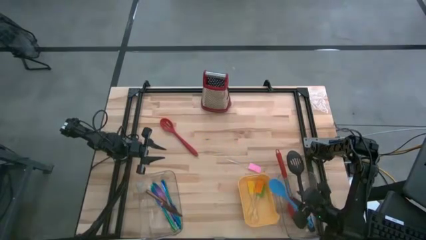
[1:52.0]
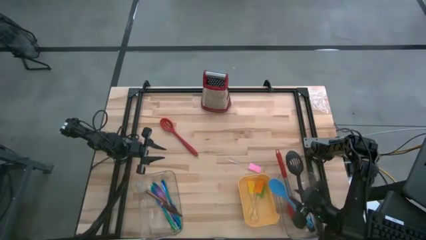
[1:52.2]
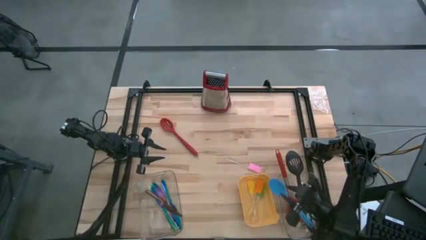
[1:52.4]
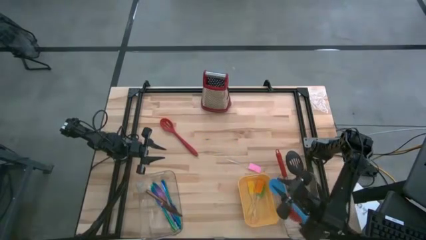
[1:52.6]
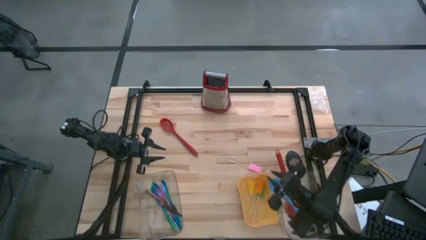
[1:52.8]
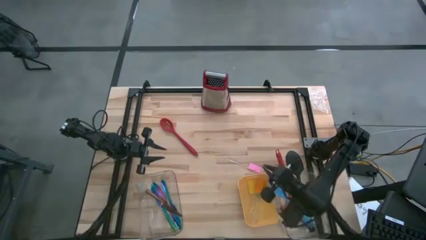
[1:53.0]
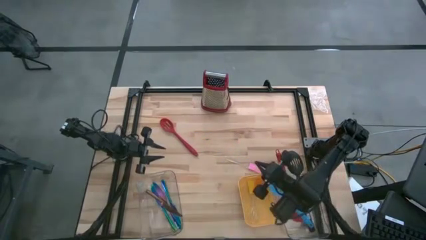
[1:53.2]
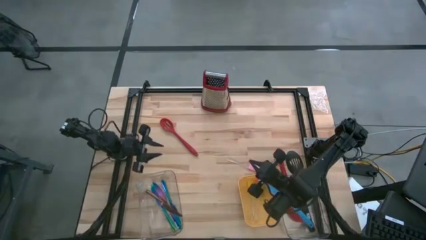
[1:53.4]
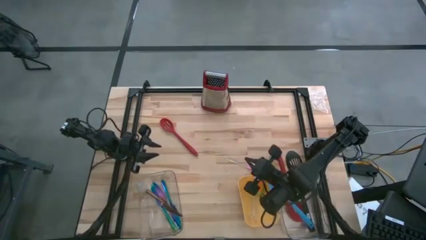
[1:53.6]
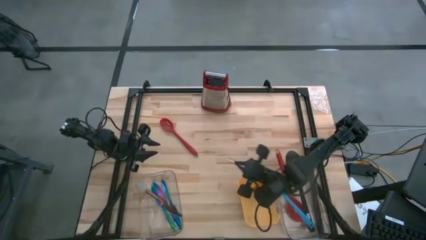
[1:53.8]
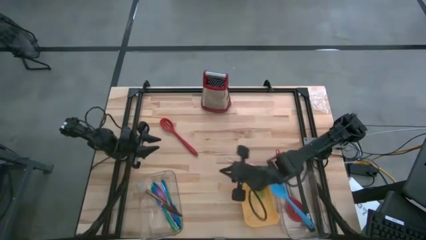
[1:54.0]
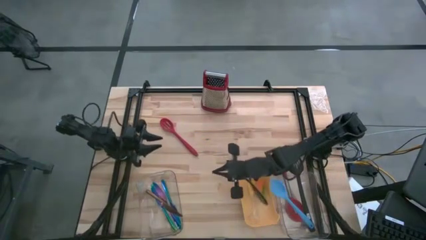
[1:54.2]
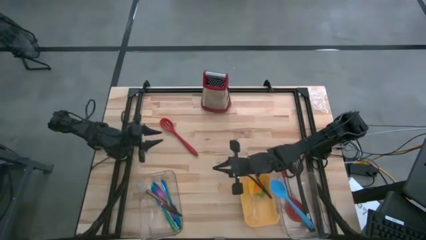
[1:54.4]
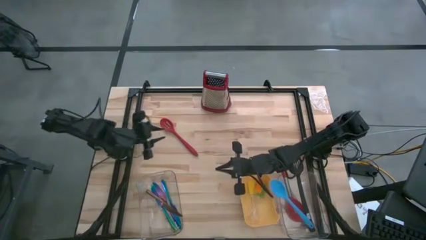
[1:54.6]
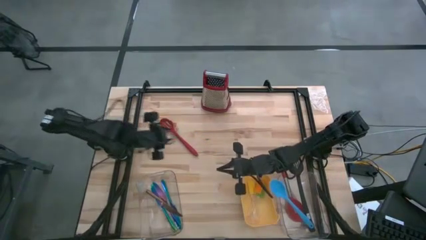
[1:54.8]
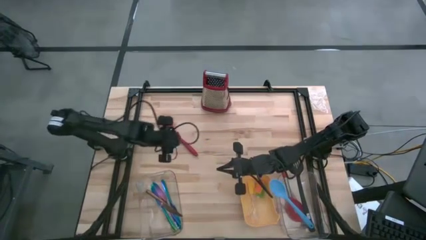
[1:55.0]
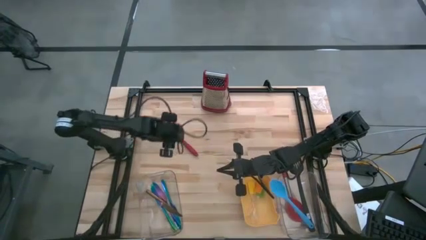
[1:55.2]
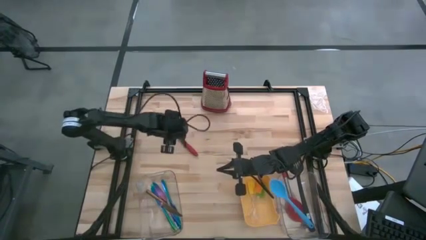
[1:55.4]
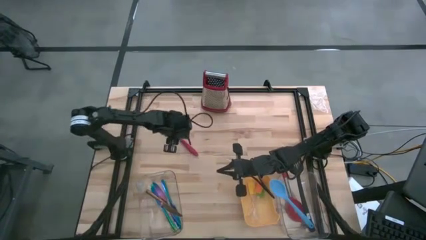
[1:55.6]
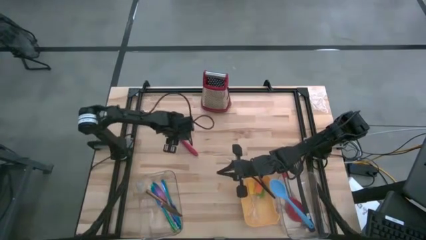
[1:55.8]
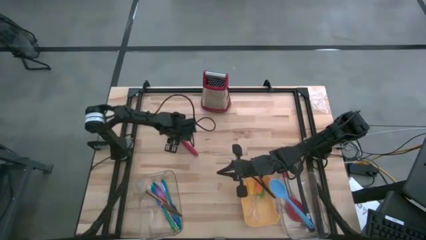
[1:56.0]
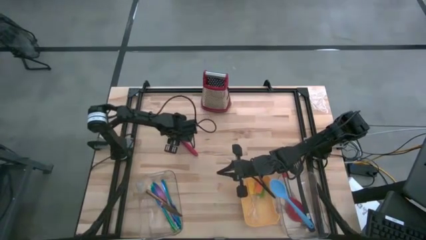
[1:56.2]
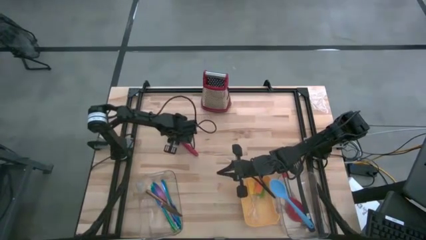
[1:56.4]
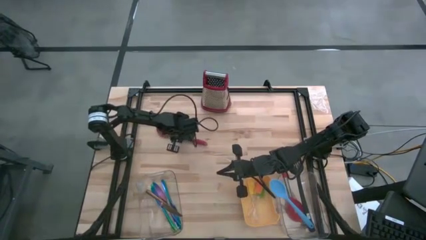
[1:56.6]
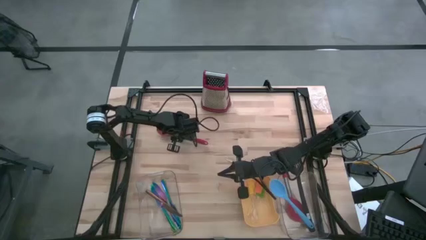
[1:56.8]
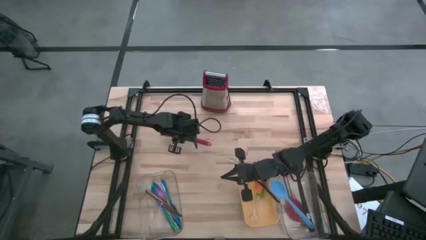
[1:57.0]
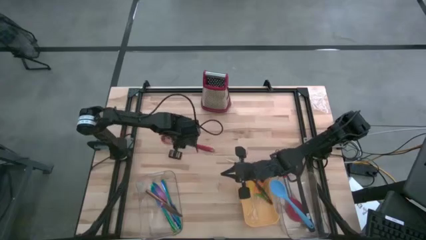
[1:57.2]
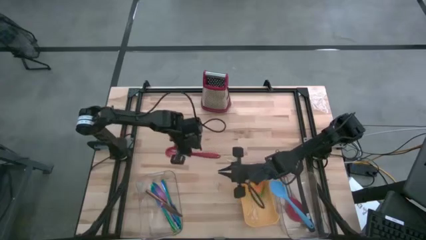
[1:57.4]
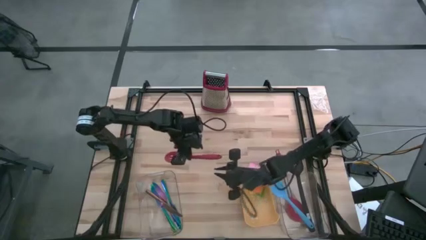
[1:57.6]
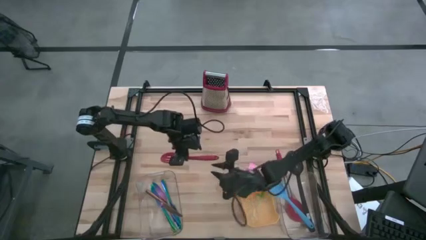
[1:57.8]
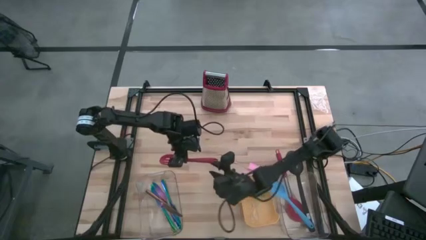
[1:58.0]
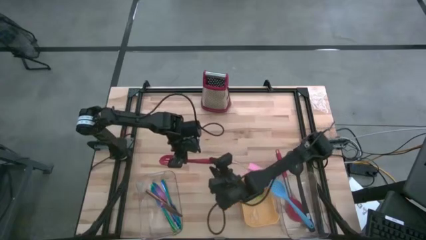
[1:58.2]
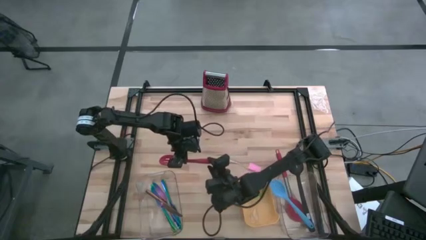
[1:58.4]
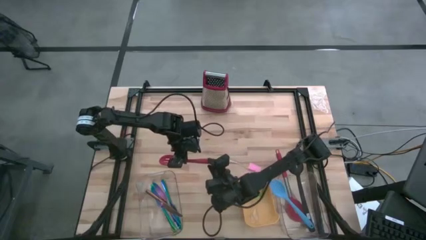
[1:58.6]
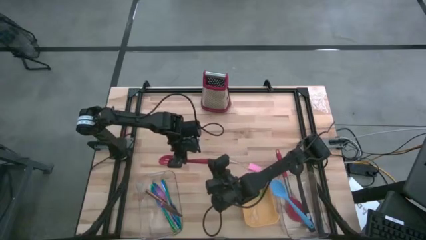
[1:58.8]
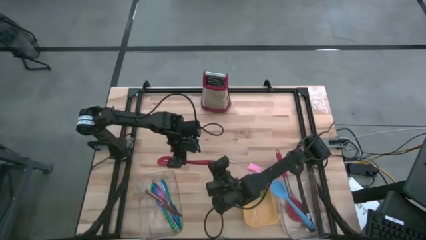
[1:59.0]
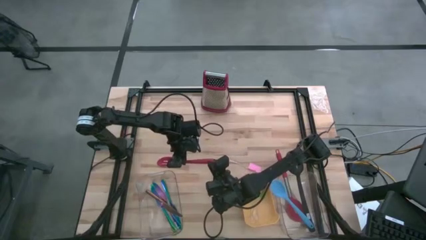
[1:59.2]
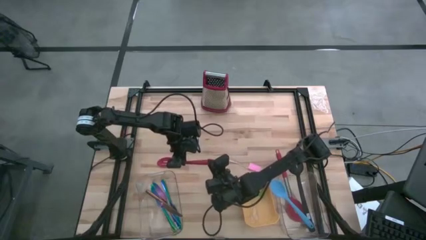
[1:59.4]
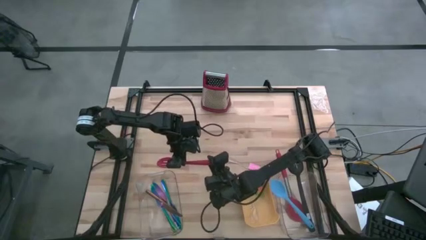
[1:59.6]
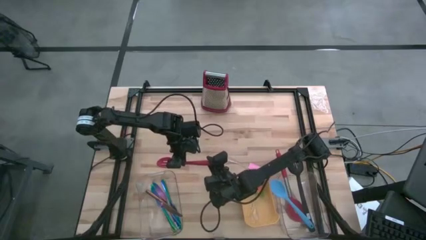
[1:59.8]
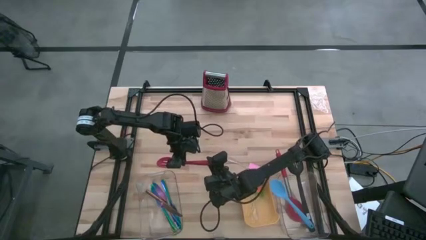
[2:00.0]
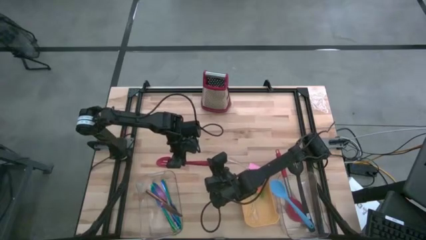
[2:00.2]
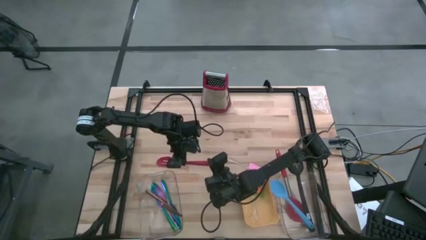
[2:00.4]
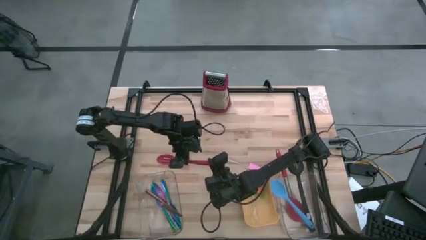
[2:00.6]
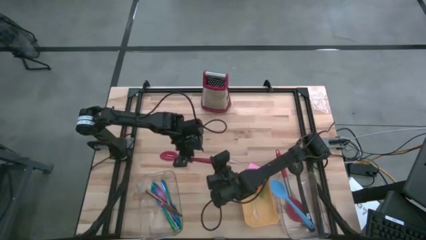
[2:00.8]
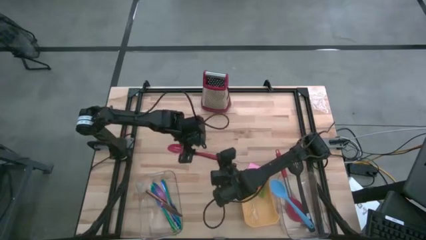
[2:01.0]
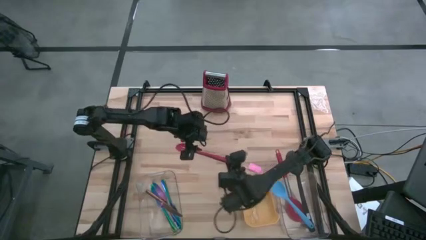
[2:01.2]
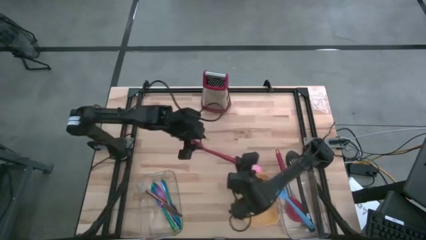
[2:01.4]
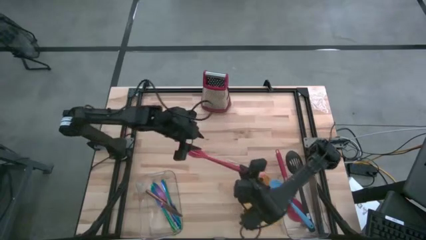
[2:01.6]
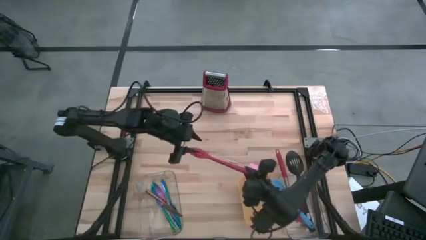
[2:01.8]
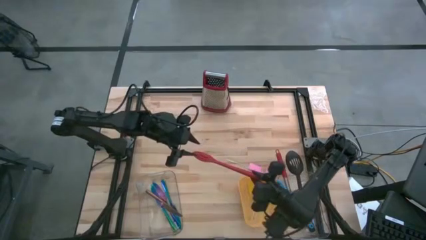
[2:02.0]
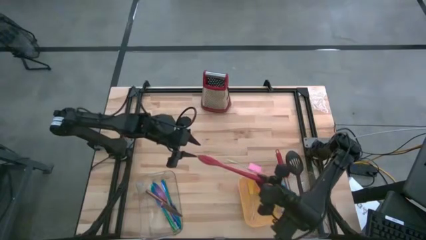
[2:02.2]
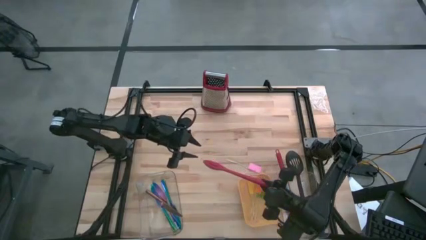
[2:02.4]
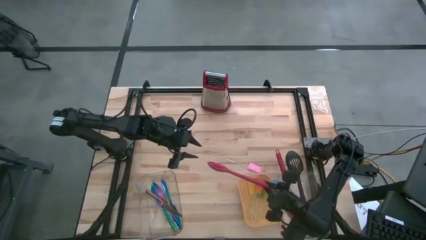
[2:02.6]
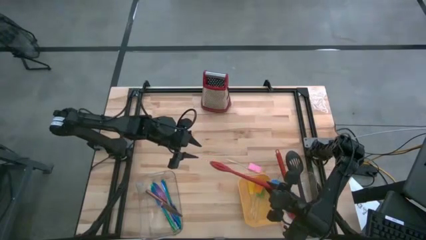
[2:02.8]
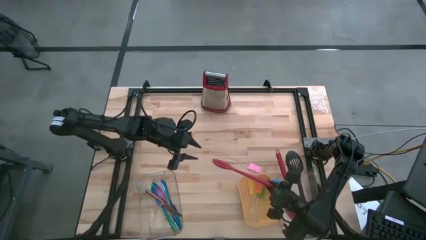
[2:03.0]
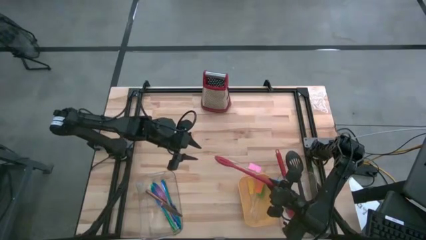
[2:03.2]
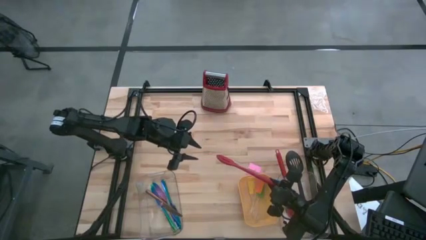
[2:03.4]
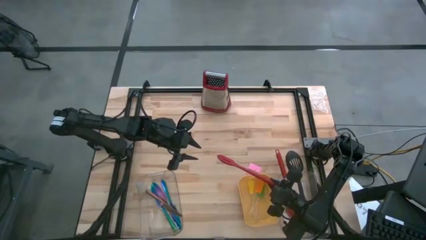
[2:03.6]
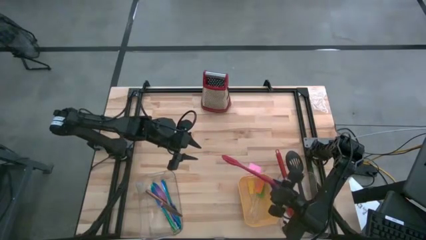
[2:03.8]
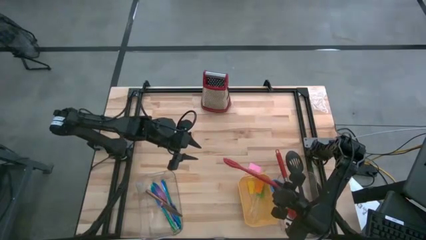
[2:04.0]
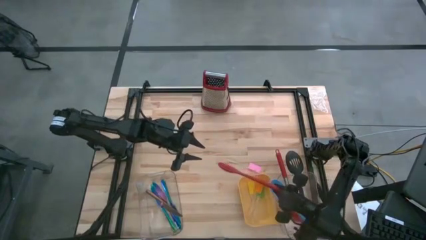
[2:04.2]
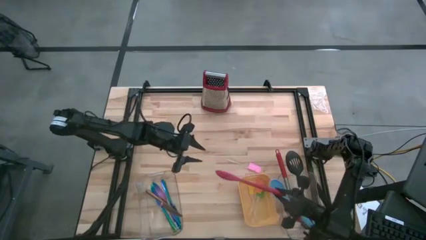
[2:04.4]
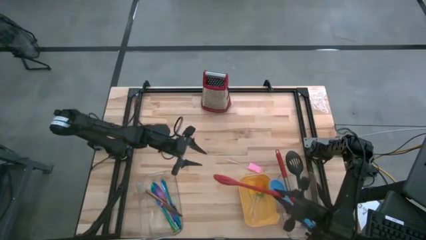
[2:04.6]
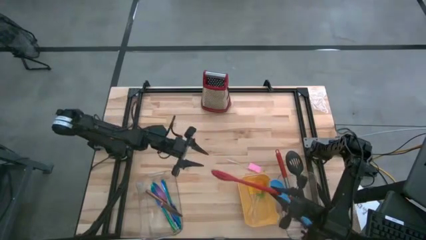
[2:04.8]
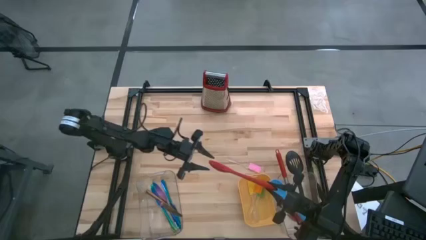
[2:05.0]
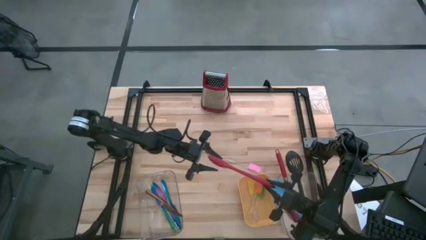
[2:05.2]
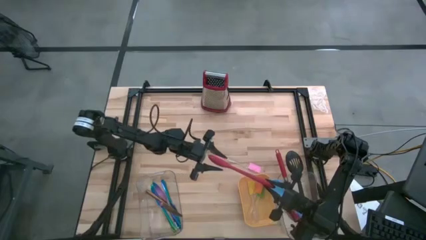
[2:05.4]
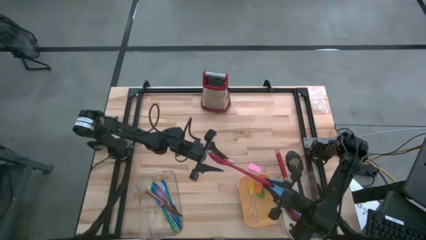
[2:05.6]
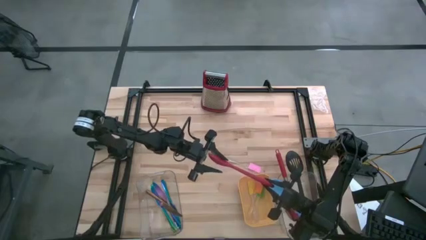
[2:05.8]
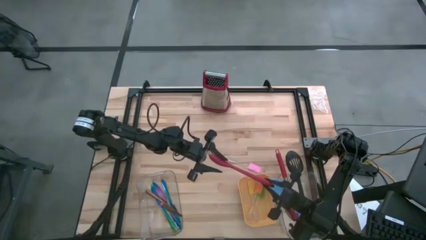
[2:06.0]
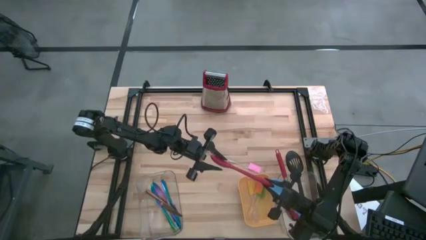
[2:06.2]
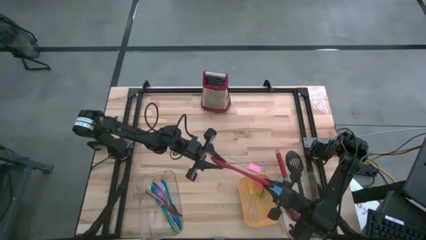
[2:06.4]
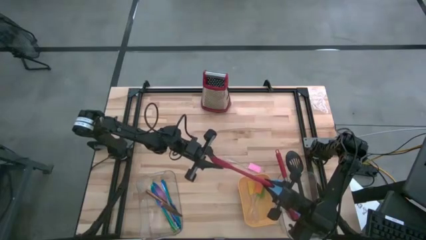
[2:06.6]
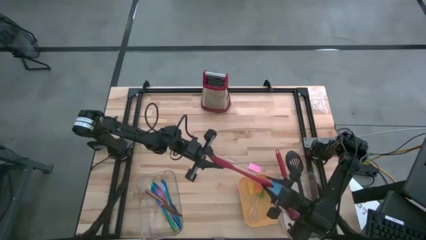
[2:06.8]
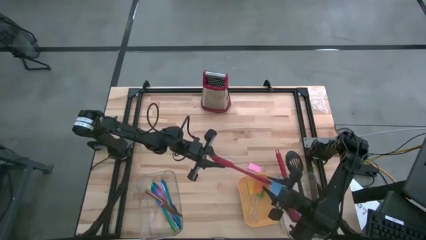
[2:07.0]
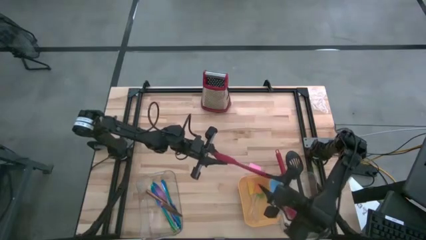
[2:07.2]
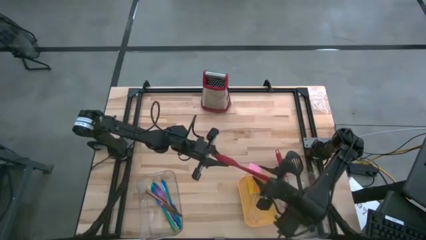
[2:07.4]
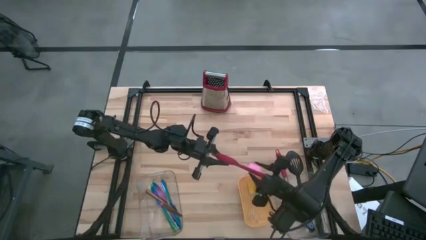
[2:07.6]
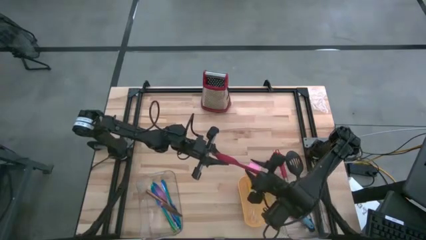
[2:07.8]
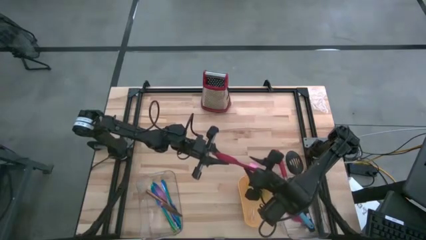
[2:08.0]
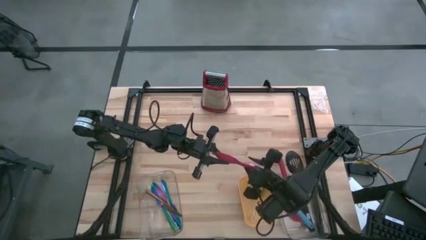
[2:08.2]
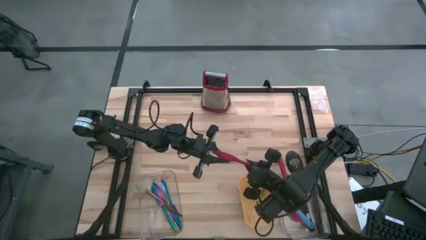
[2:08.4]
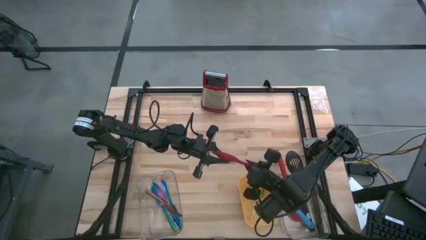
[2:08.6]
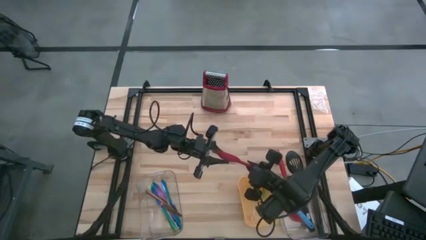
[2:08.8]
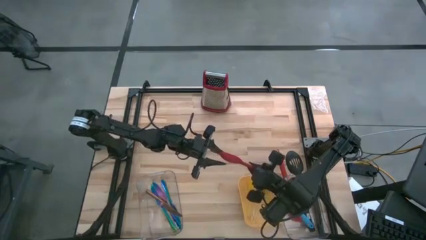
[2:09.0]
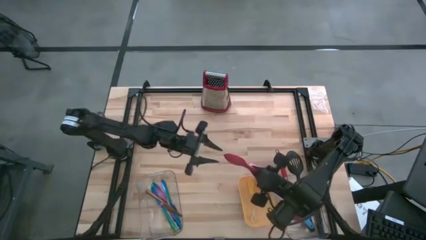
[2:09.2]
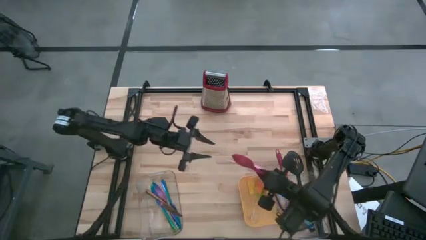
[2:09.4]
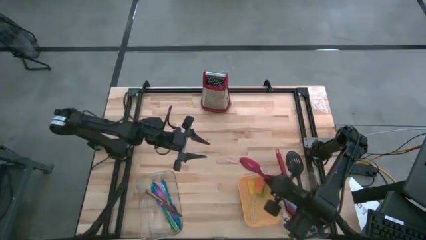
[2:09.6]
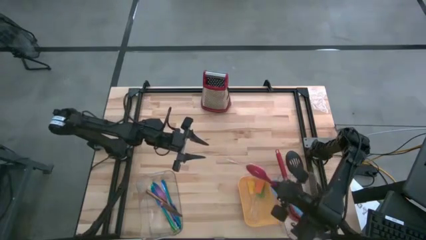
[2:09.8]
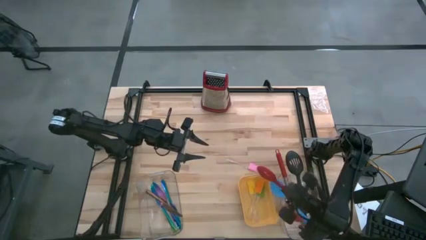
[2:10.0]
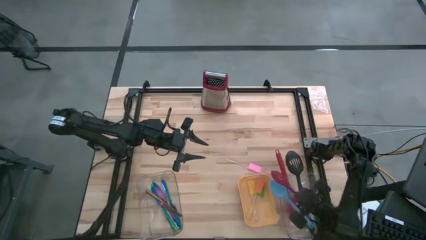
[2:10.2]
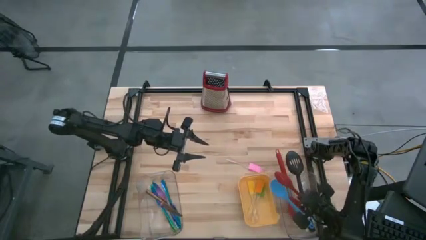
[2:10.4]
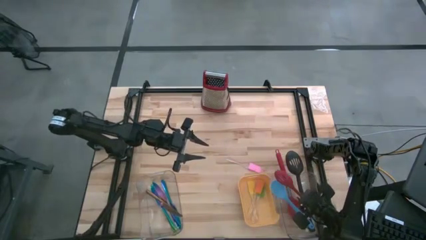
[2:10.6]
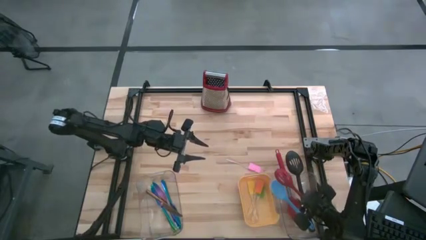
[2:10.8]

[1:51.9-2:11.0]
Task: Pick & Place Kitchen Items
Put the red serving spoon into the right transparent bin
